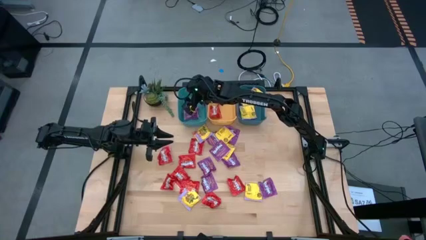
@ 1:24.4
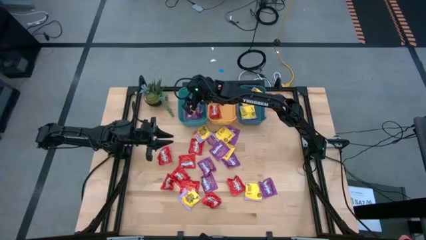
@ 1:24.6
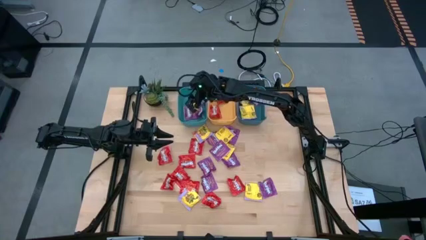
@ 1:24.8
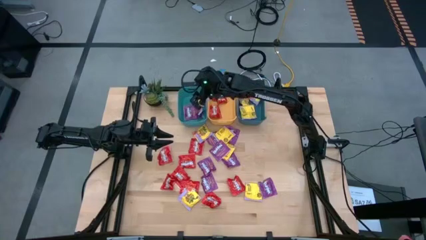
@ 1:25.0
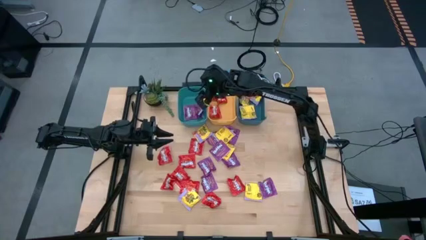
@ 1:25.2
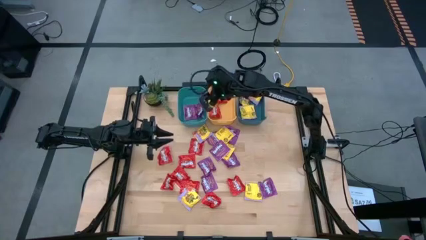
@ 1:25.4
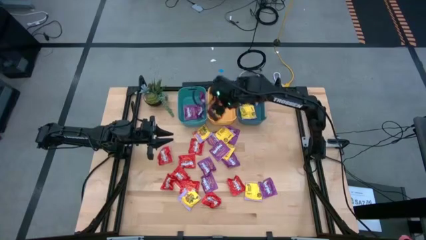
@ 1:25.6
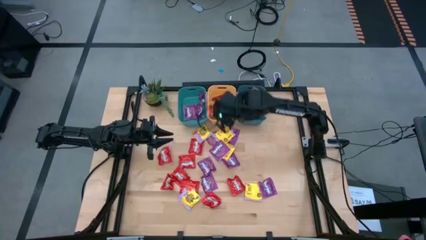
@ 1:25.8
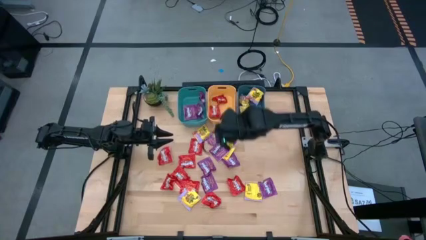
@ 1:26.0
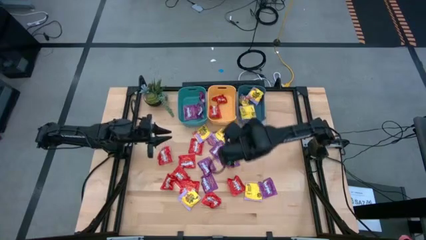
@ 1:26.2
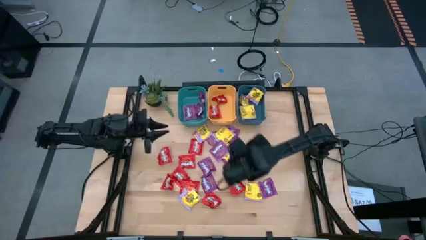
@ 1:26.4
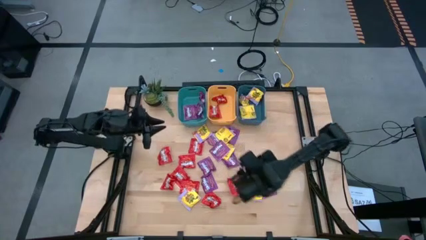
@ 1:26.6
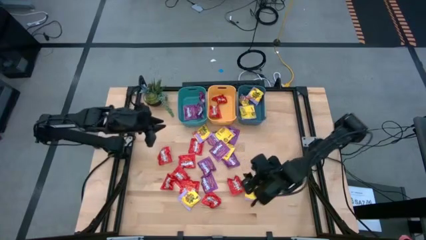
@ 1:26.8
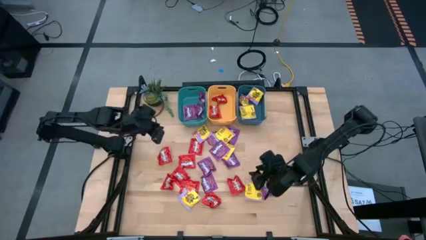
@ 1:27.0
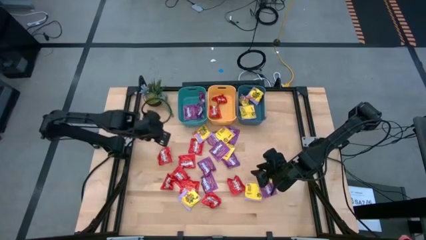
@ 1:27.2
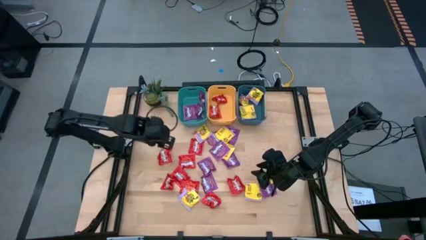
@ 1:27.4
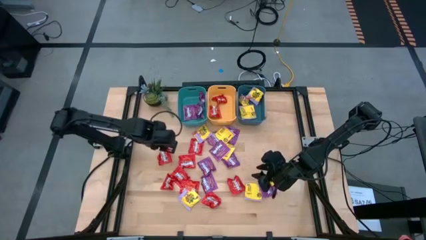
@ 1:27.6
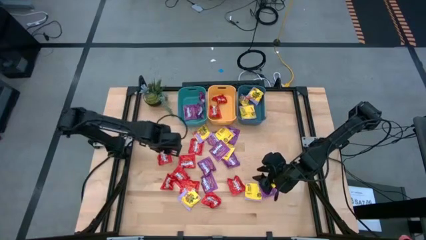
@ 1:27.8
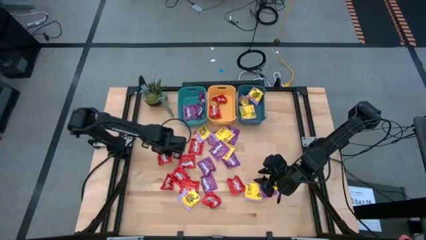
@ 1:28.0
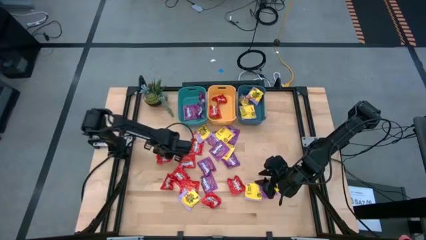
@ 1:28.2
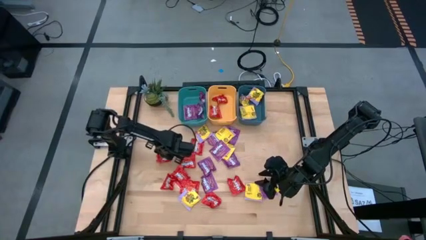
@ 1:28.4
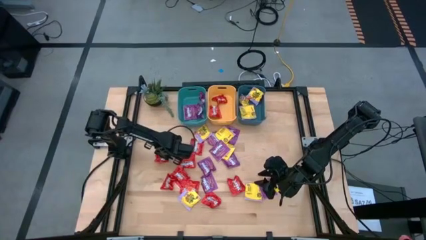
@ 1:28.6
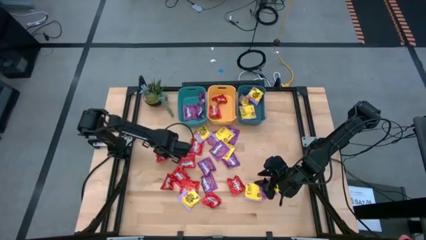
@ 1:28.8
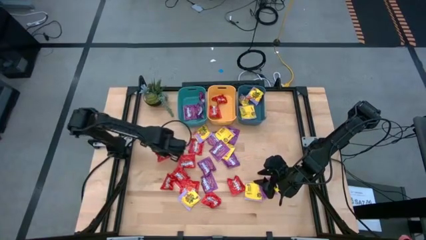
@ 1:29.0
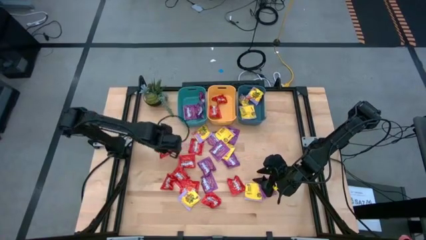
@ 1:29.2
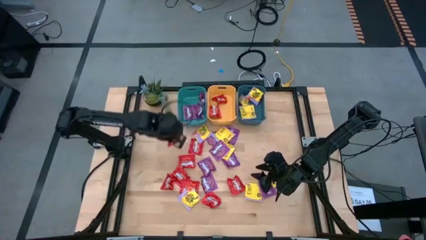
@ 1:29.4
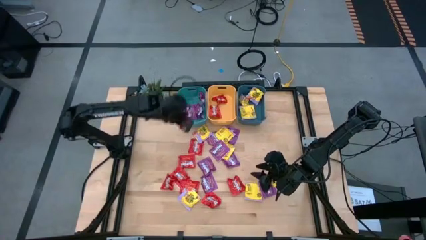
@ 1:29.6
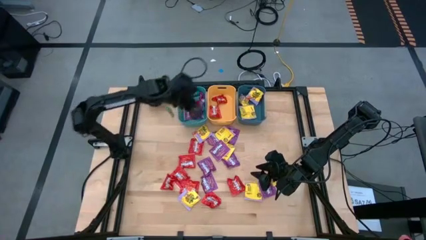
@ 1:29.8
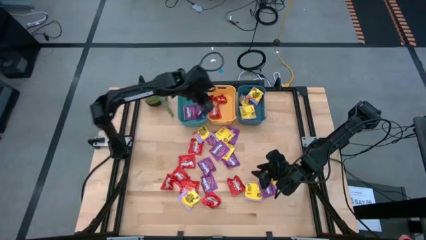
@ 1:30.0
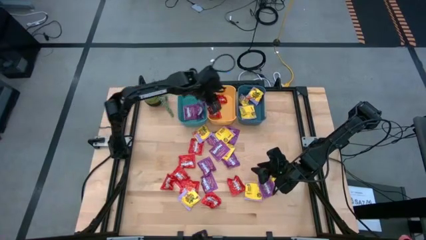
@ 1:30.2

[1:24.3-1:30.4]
Task: Sort candy
Put the red candy into the yellow bin

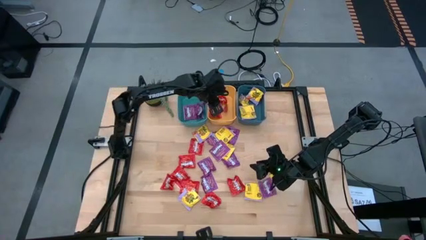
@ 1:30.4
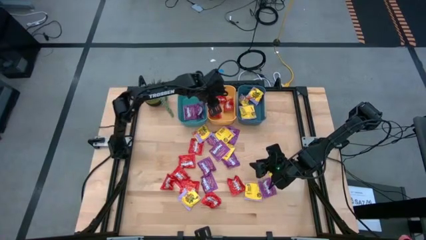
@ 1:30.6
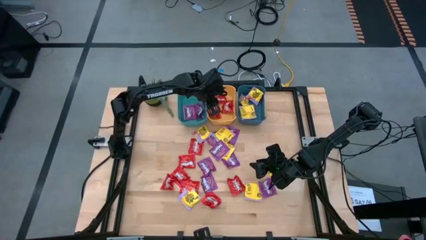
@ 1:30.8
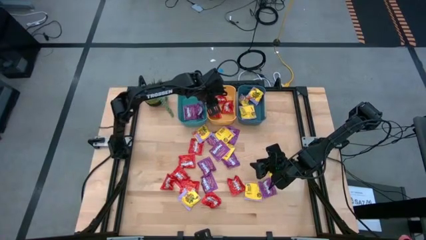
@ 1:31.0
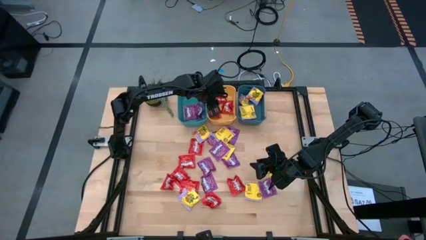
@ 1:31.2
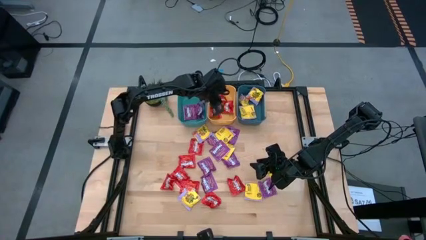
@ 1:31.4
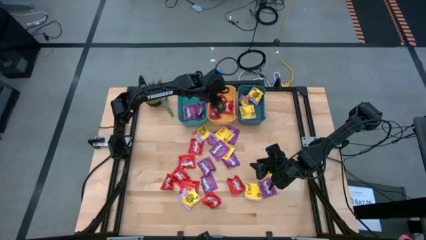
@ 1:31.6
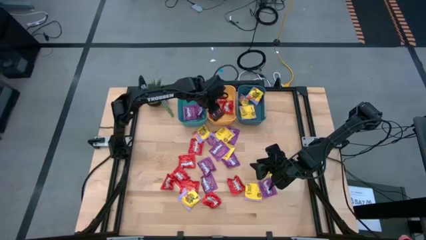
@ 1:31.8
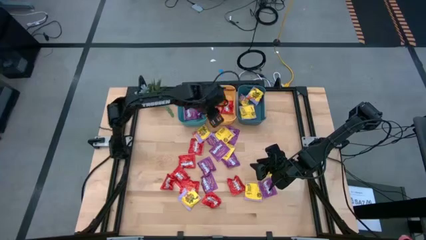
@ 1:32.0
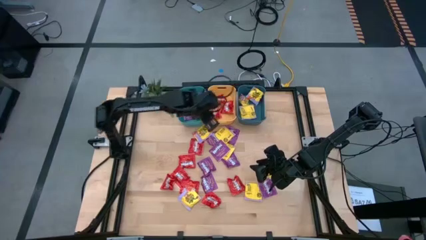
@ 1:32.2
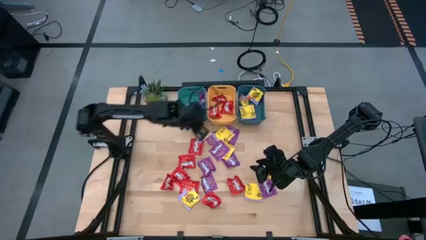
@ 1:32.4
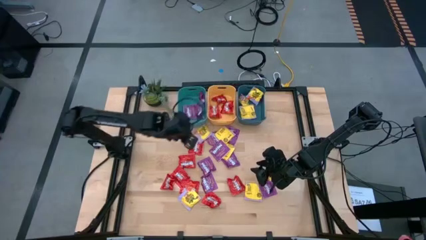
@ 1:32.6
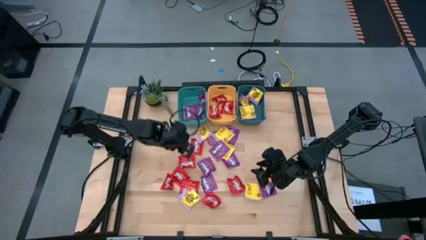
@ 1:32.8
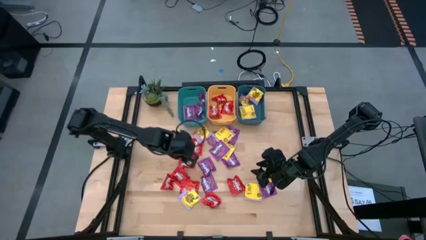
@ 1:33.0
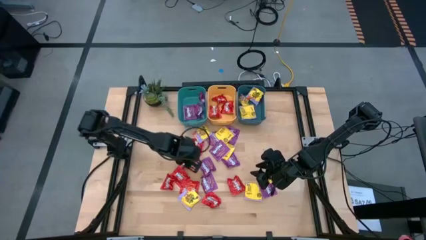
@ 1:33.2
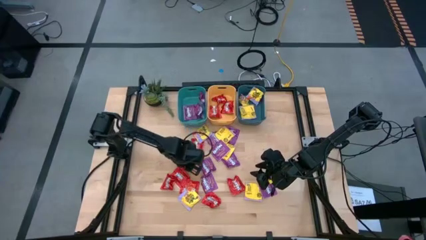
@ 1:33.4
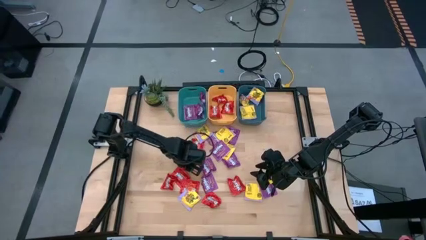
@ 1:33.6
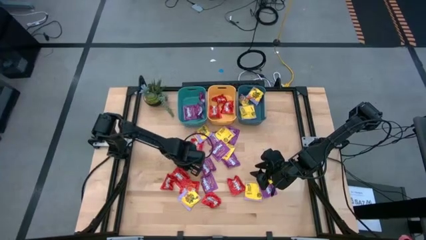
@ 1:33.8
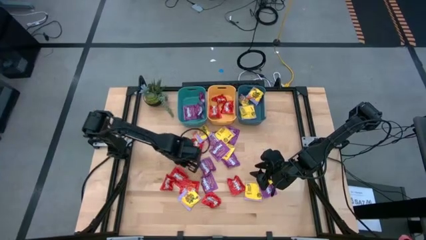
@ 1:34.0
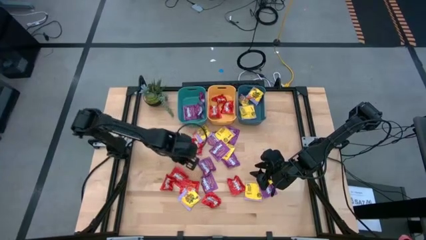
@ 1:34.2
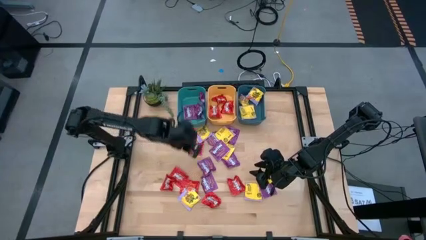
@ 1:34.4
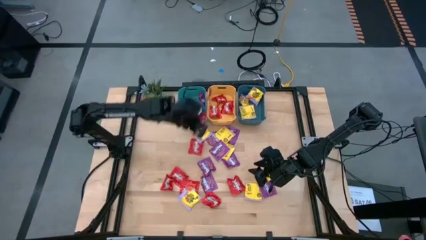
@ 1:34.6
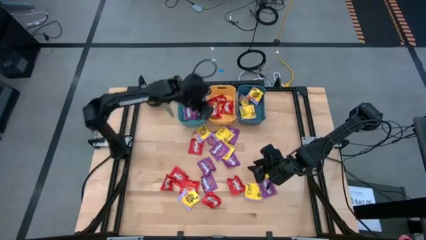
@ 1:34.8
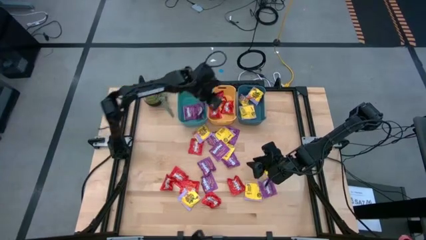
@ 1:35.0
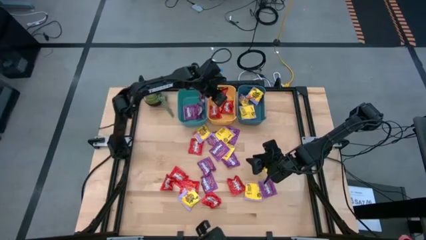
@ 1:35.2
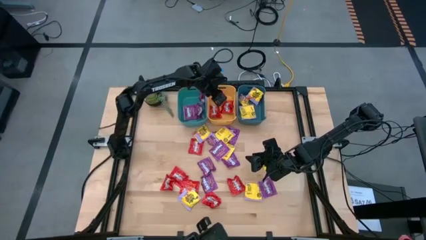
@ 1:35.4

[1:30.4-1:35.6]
Put the red candy into the yellow bin

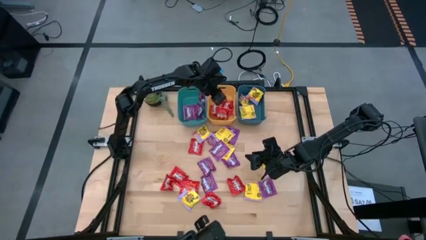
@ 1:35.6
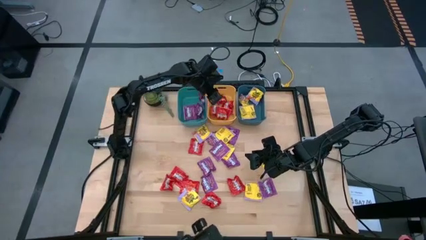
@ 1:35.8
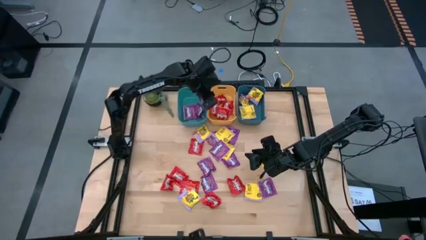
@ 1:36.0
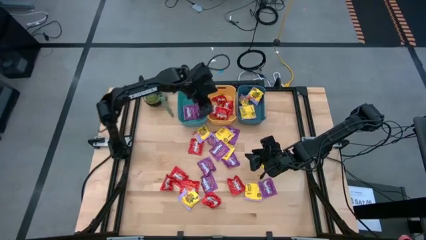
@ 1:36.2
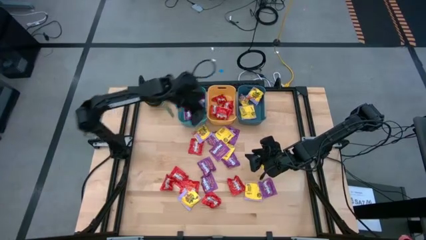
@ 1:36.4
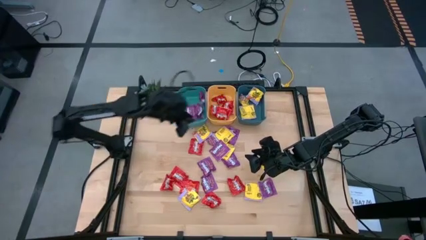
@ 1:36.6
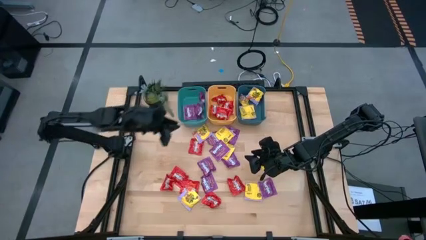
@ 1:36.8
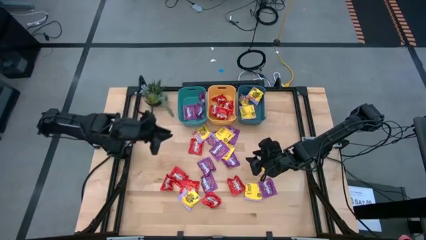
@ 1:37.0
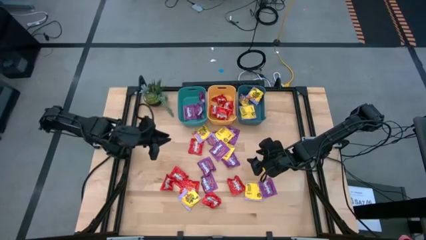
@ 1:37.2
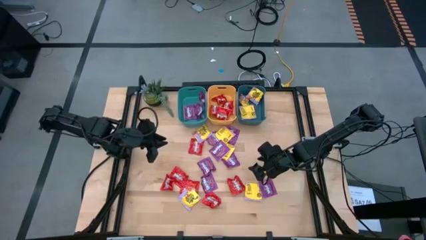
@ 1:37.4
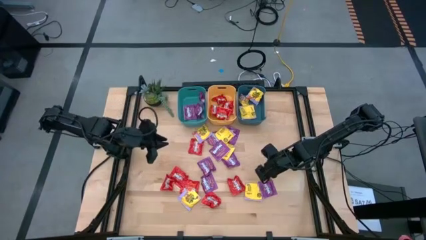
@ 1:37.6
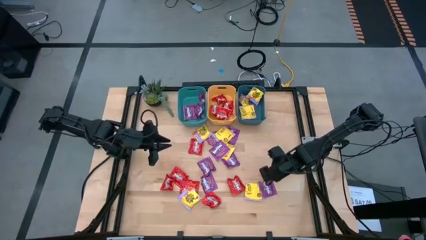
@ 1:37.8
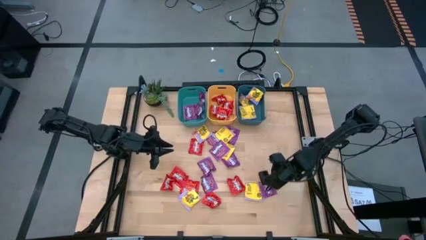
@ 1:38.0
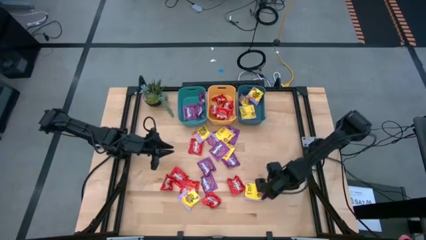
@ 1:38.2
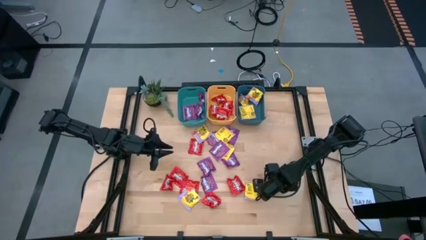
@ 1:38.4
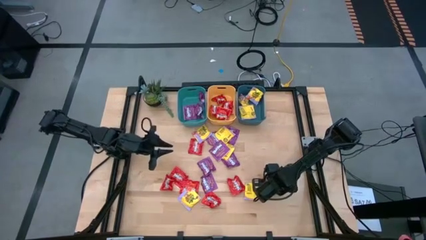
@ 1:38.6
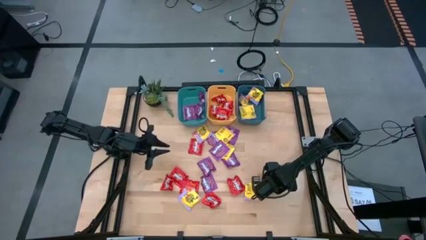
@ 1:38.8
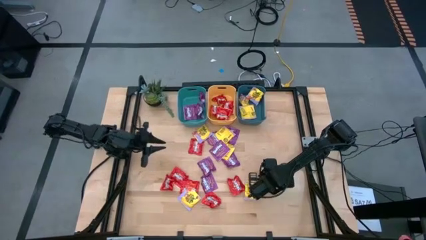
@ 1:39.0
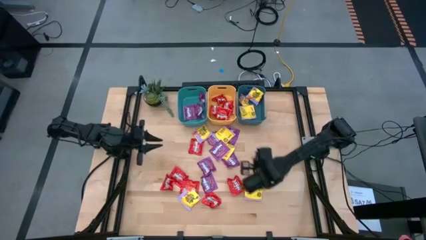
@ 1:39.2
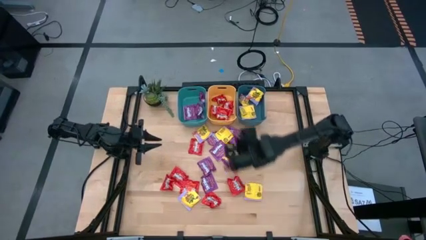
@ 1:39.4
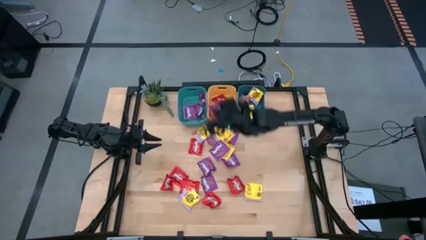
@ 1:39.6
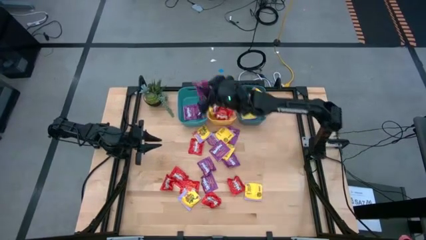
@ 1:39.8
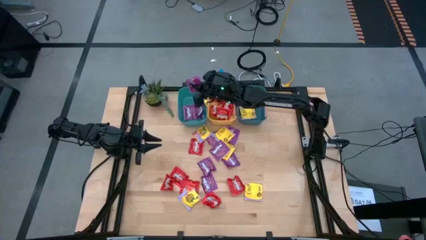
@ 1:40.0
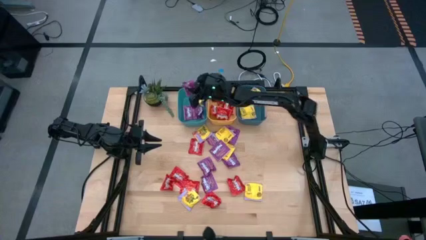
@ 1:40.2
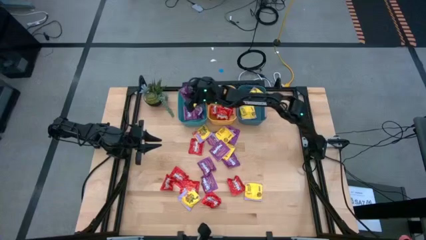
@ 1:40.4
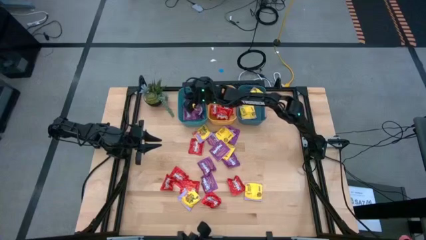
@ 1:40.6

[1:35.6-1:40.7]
Put the violet candy into the blue bin
